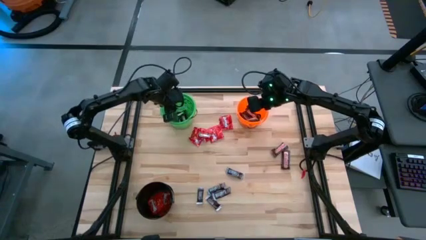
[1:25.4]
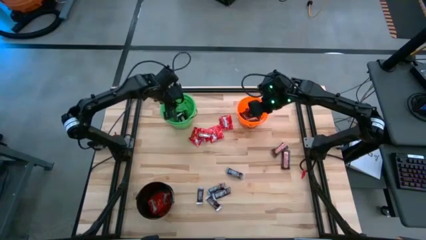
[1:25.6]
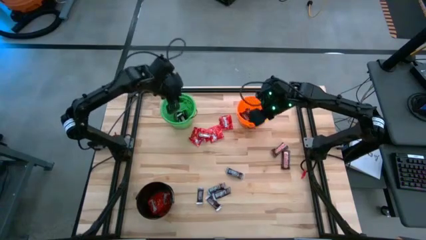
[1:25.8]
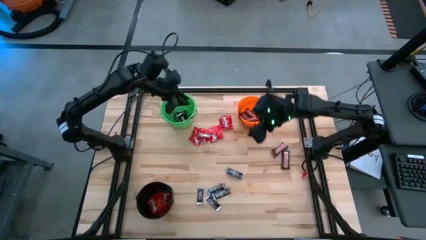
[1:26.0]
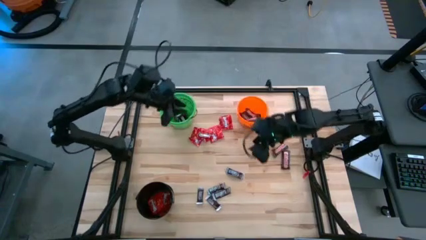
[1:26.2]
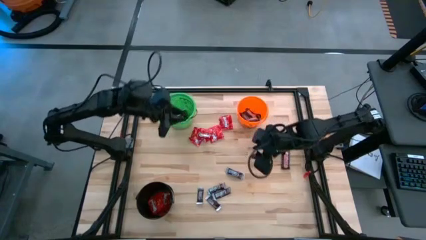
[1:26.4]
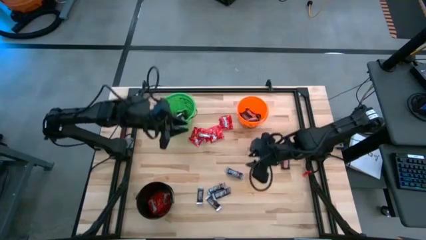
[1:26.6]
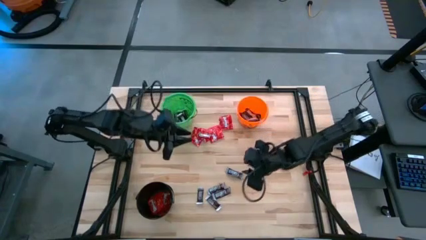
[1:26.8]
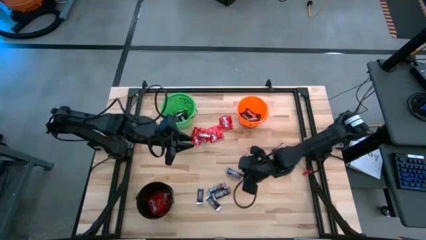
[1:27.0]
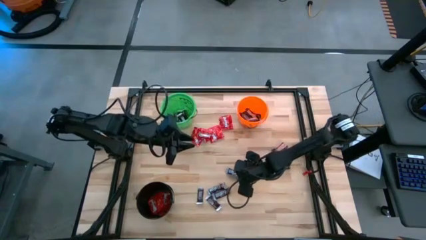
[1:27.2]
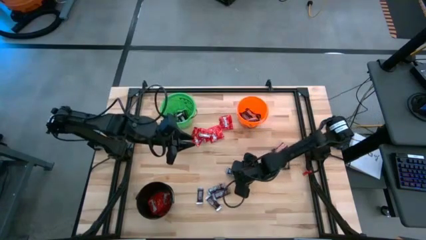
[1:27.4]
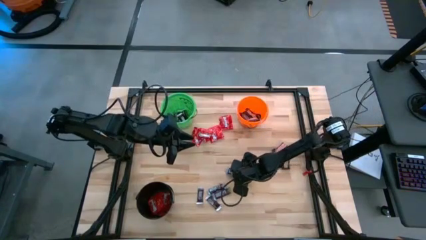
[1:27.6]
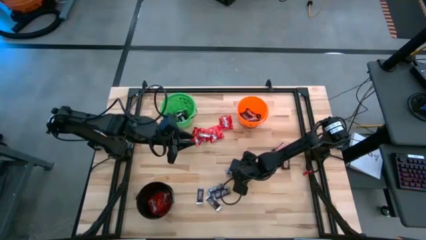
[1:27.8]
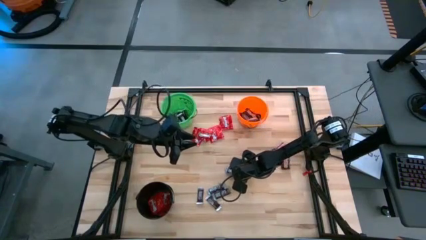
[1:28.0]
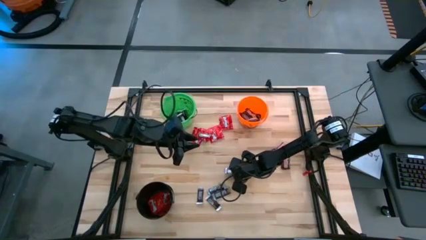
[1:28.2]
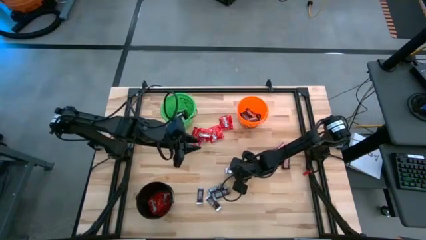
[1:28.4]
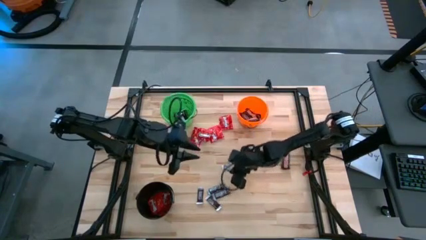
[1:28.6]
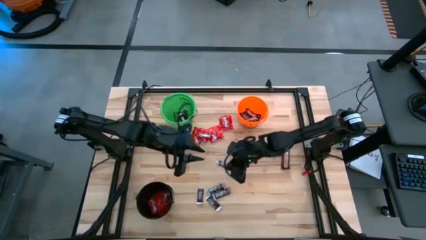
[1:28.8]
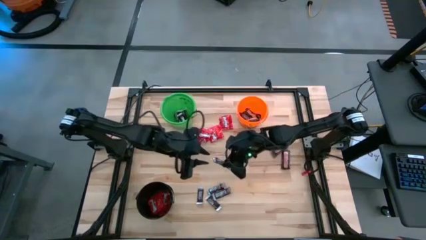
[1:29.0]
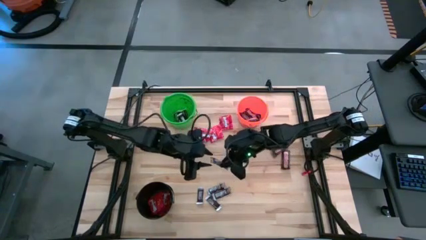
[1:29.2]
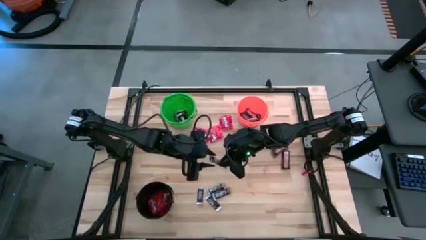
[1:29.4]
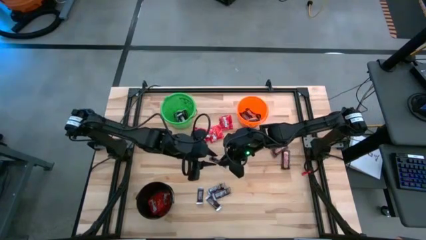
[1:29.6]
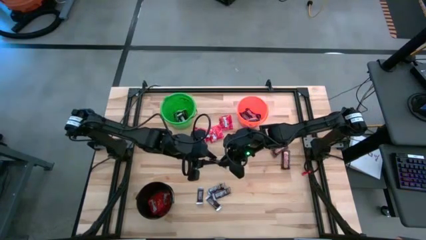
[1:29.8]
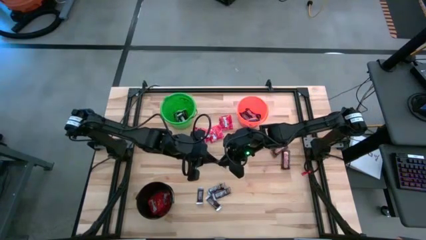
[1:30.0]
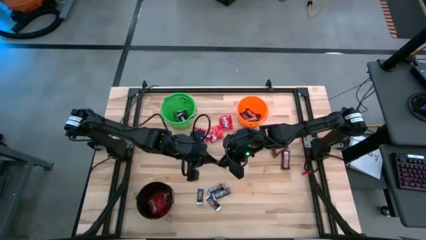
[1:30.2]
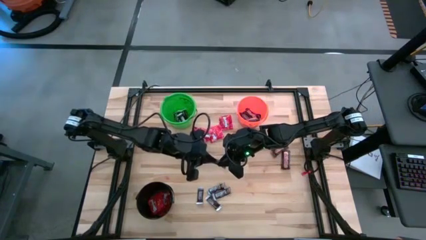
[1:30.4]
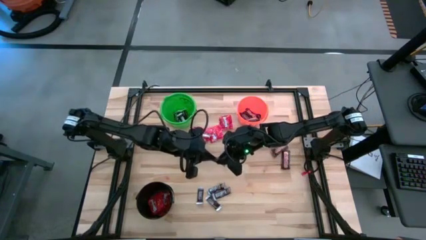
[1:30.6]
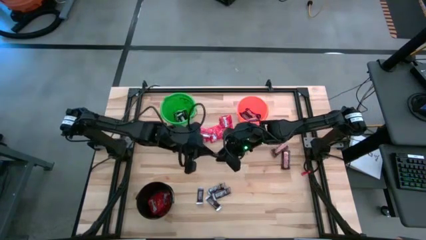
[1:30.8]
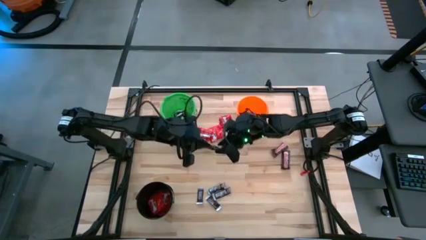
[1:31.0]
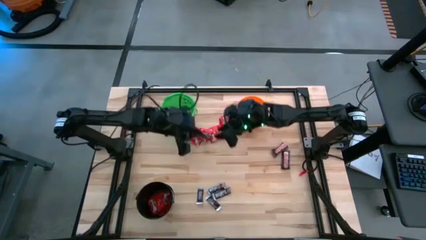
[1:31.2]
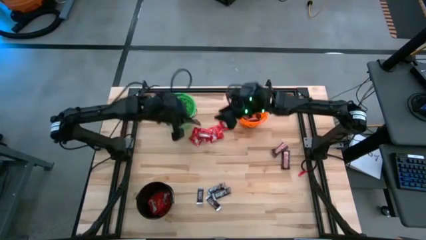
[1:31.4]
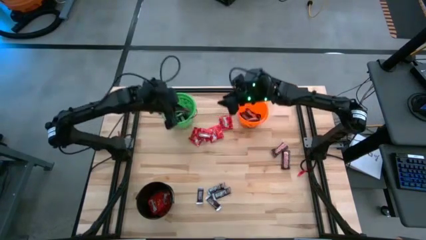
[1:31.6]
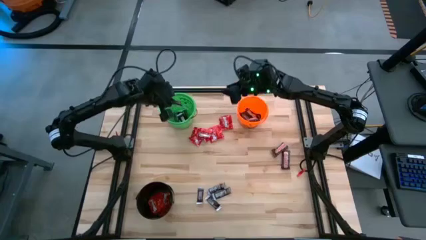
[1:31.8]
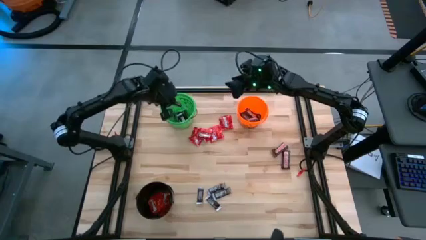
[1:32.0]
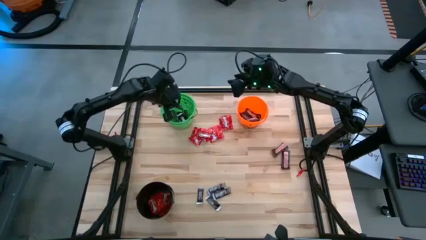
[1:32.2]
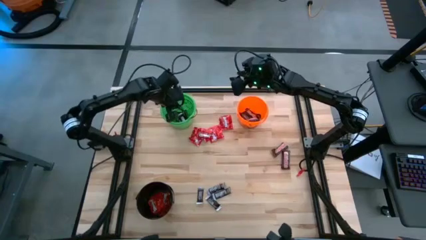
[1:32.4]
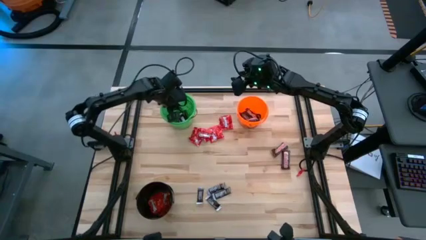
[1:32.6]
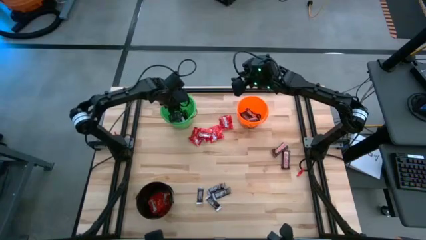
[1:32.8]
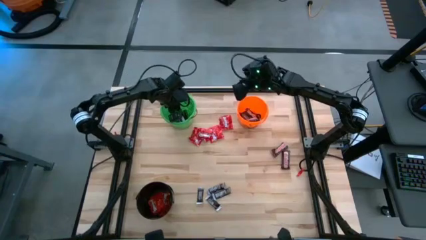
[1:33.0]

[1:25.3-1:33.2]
Task: Sort candy
Put the black chocolate into the green bucket

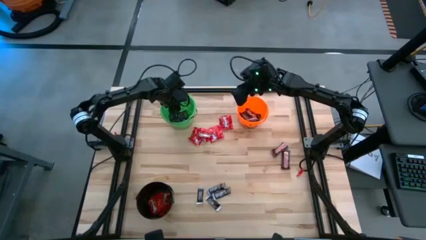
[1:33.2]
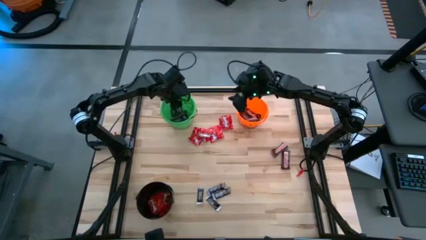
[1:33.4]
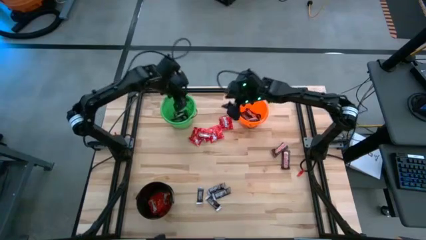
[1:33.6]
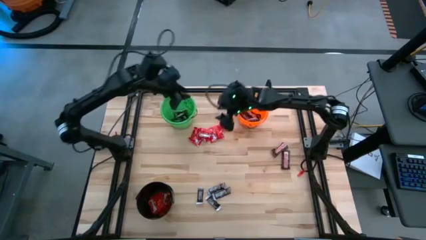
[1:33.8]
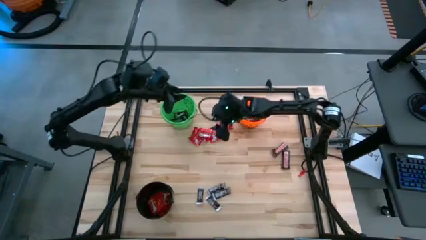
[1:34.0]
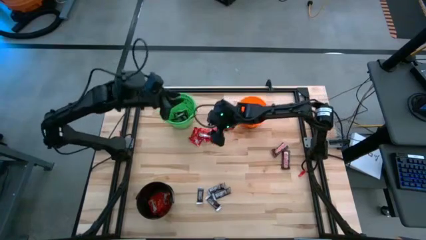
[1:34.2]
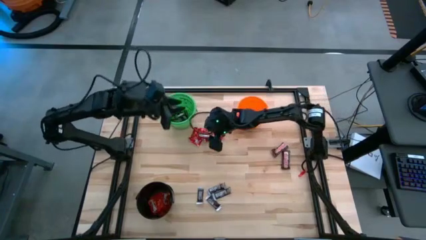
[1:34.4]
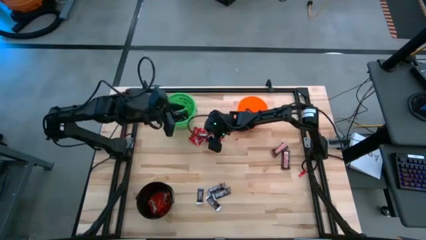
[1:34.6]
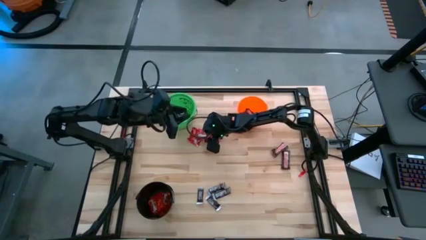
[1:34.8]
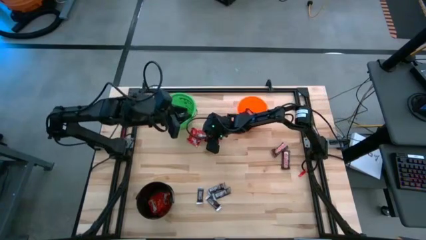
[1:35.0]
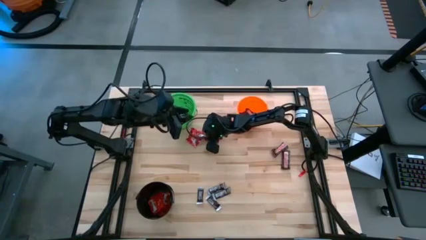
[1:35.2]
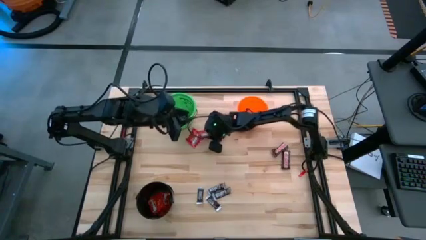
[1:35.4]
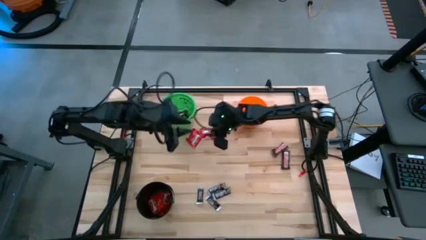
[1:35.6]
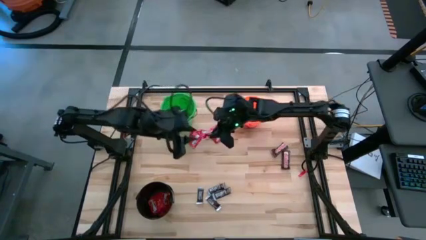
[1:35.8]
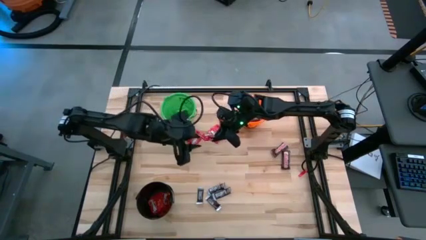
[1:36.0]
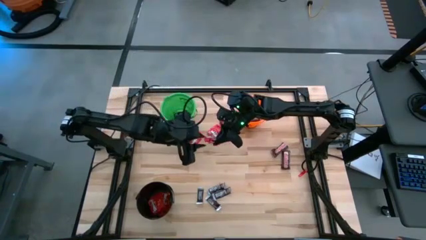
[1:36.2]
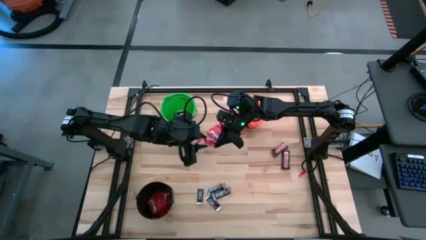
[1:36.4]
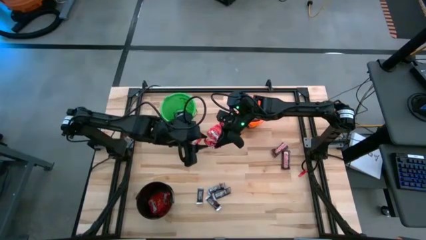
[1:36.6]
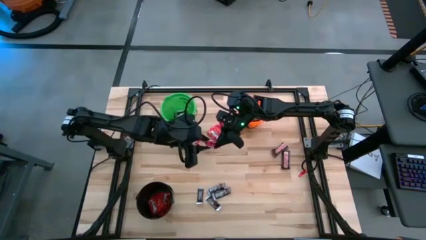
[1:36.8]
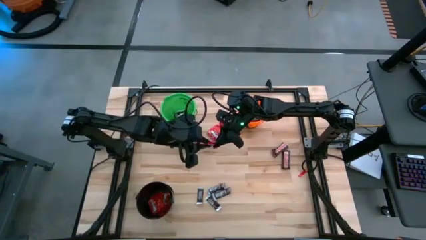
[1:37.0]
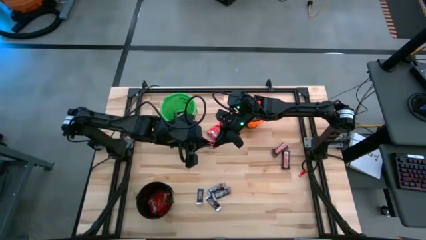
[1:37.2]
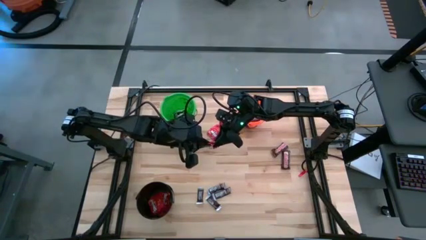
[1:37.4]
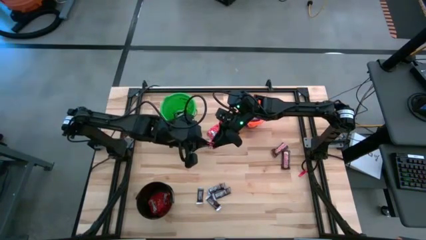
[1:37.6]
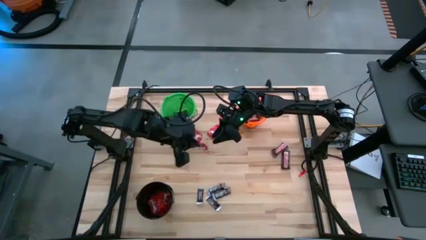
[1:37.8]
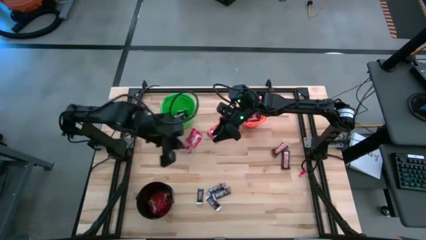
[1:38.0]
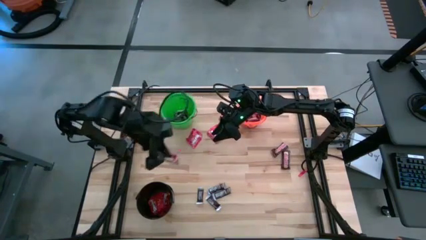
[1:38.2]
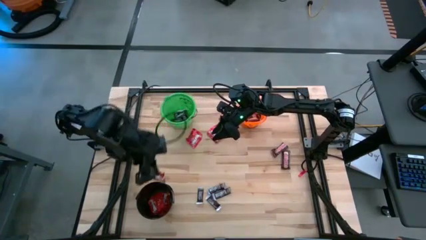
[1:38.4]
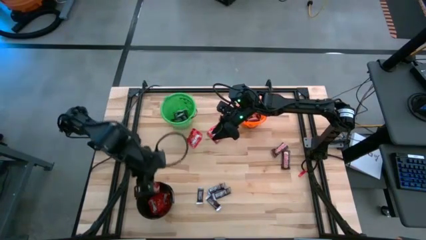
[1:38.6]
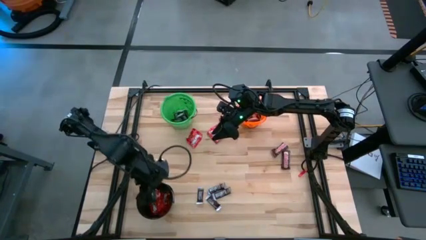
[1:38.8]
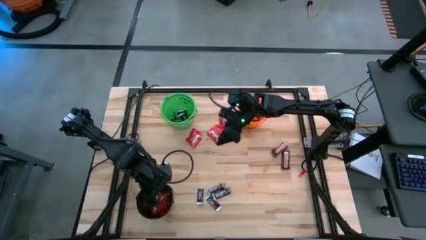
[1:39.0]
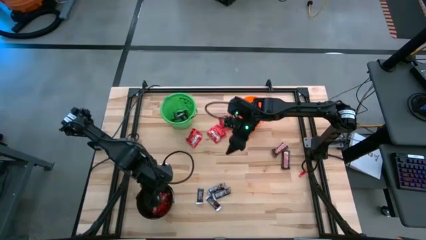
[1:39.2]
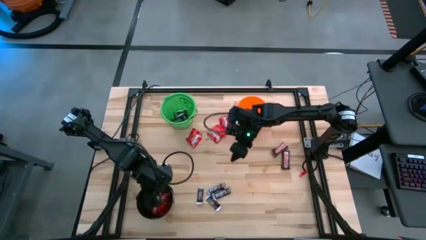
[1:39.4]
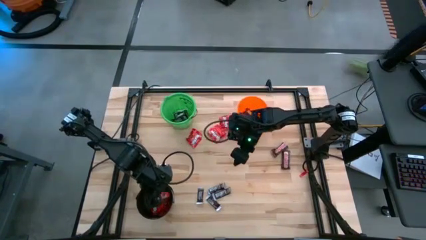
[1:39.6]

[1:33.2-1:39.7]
Put the red candy into the black bucket

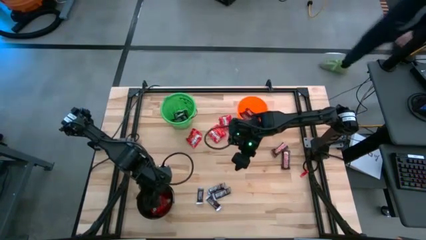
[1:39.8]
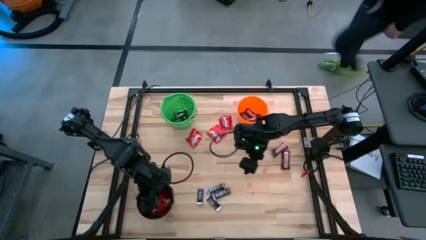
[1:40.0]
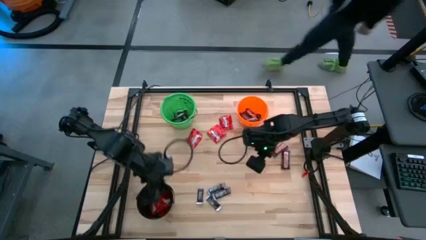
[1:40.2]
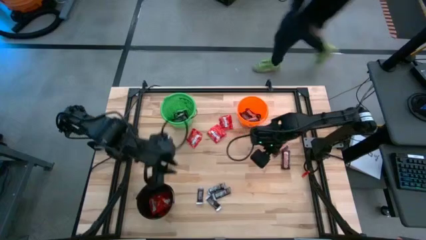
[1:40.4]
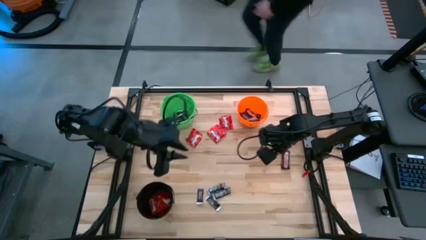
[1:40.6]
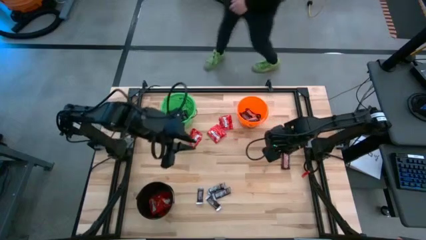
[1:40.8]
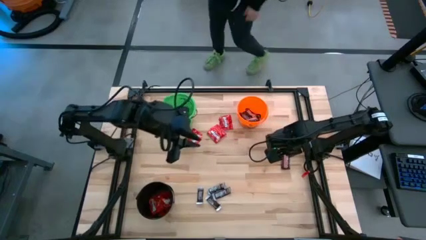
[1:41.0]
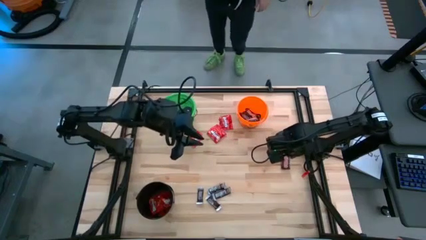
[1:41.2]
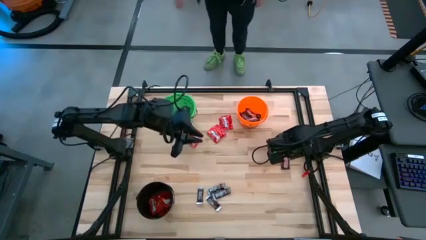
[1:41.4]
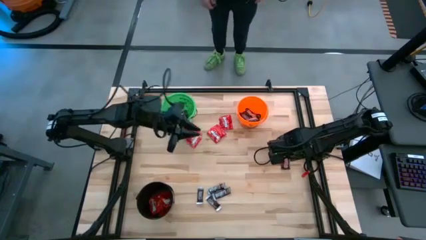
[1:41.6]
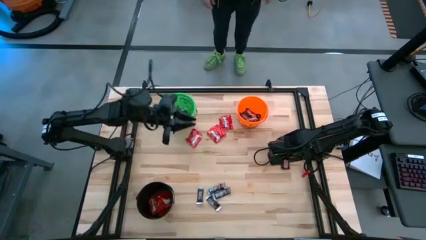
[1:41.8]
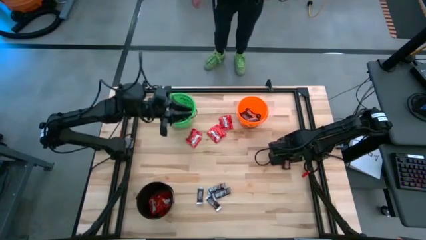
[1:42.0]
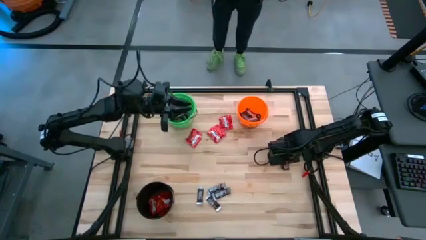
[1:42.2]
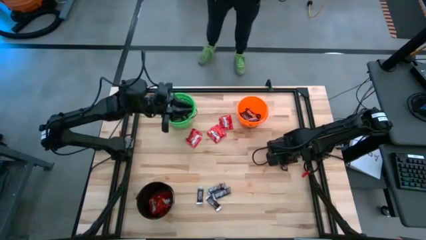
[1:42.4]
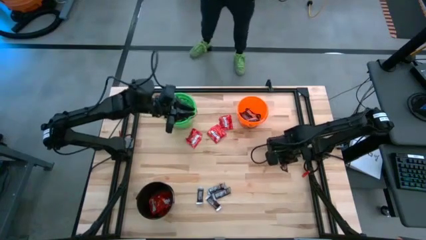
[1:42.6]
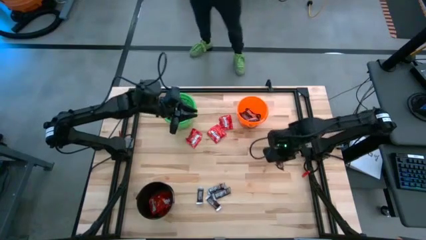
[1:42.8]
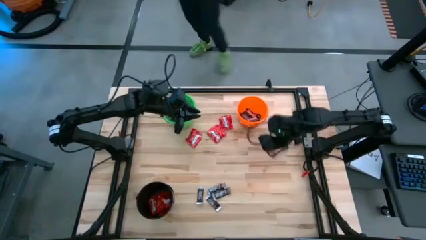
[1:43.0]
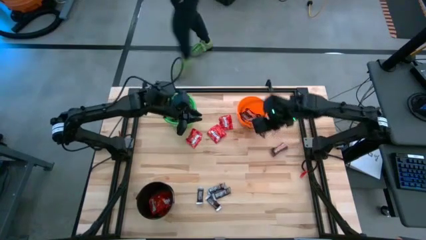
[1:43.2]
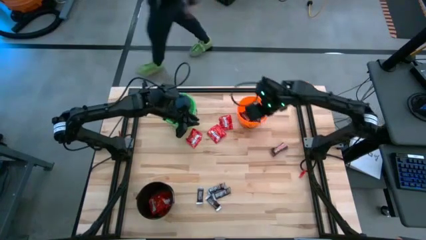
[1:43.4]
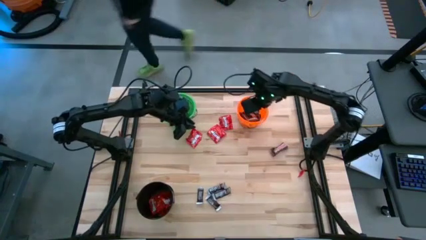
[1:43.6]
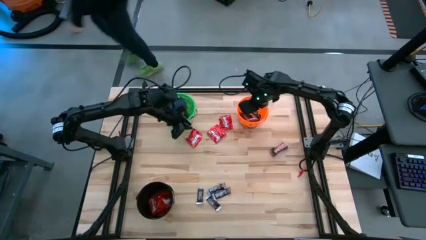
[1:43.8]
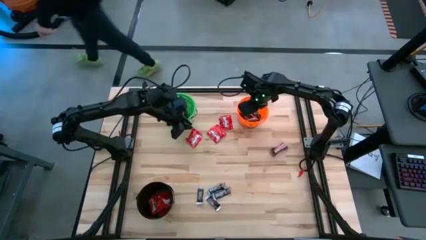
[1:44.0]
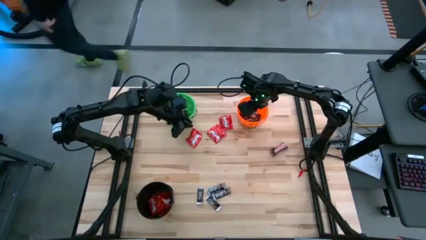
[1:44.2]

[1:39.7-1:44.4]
Put the brown chocolate into the orange bucket
